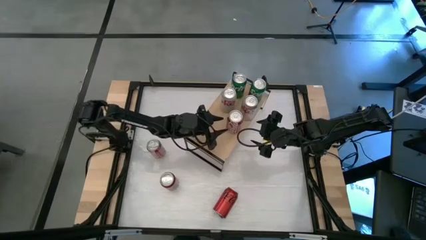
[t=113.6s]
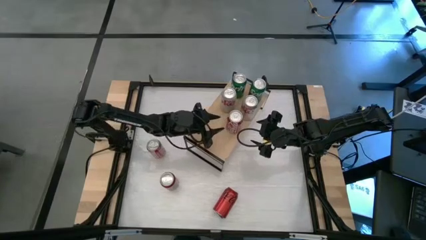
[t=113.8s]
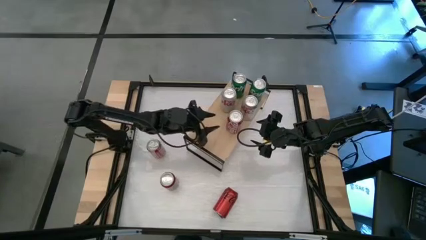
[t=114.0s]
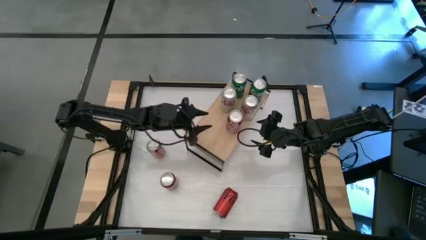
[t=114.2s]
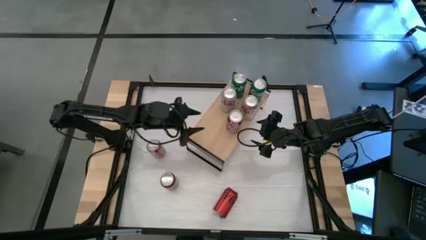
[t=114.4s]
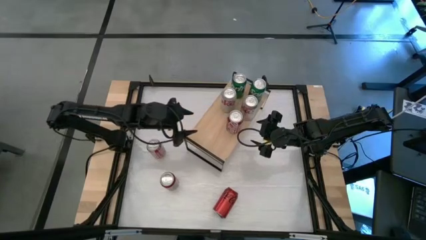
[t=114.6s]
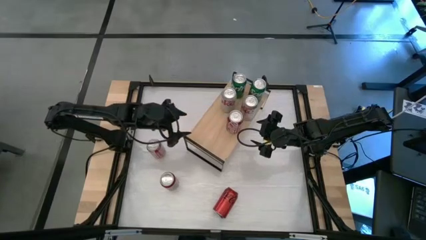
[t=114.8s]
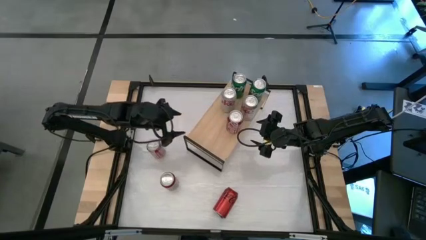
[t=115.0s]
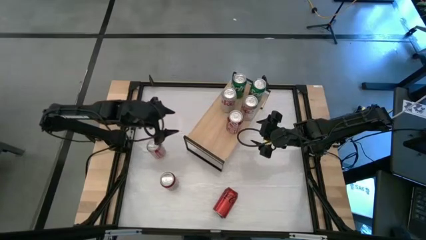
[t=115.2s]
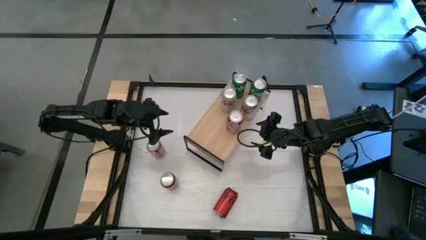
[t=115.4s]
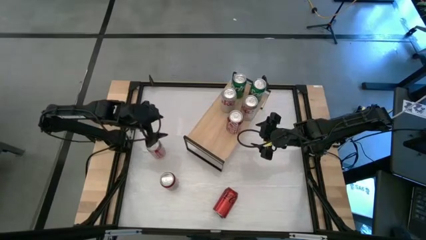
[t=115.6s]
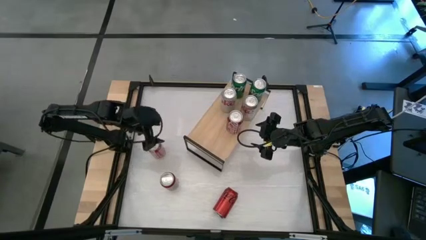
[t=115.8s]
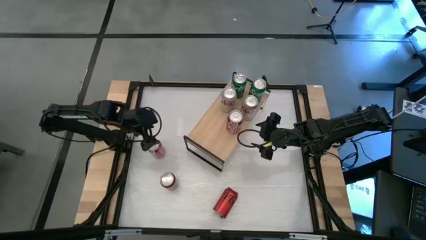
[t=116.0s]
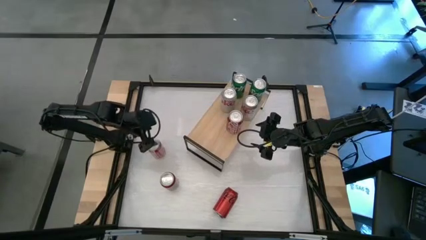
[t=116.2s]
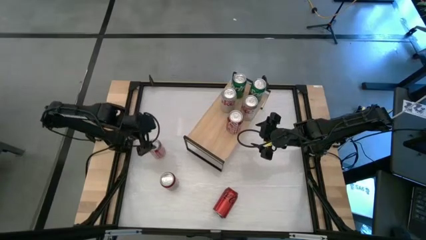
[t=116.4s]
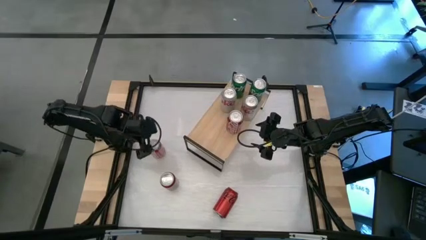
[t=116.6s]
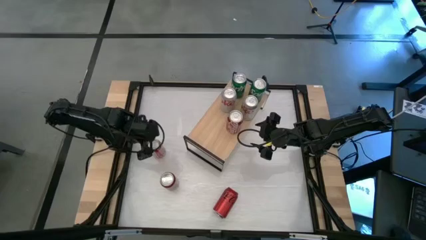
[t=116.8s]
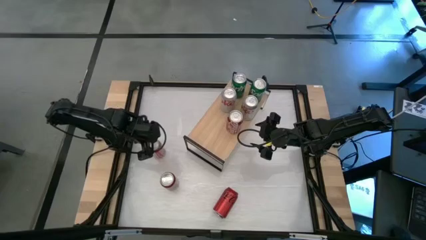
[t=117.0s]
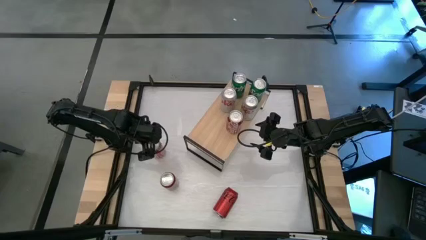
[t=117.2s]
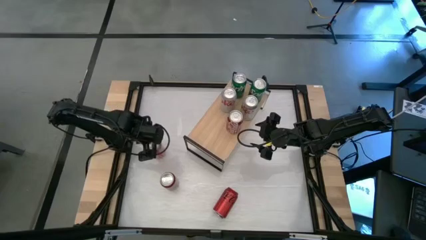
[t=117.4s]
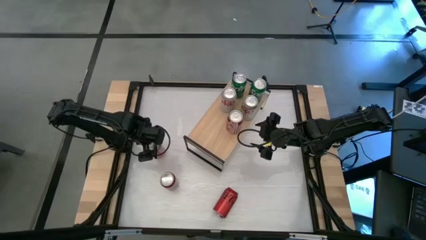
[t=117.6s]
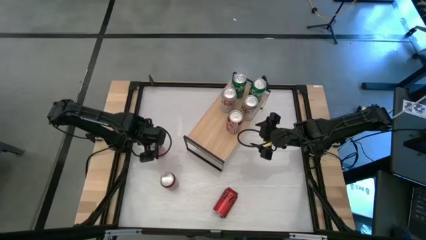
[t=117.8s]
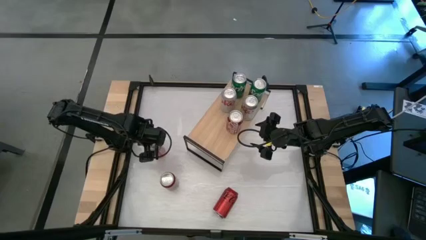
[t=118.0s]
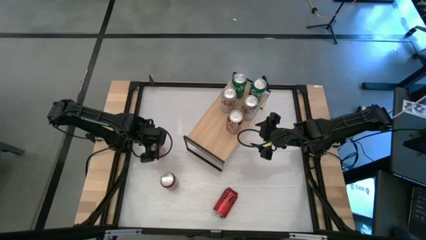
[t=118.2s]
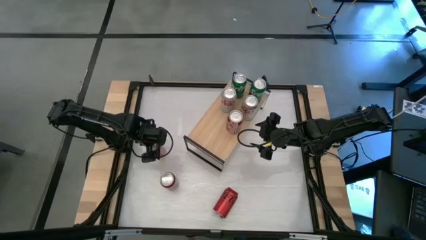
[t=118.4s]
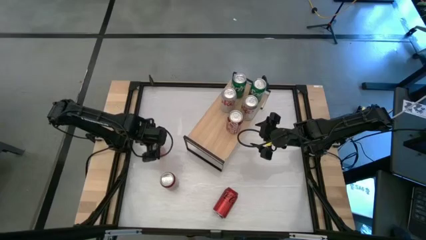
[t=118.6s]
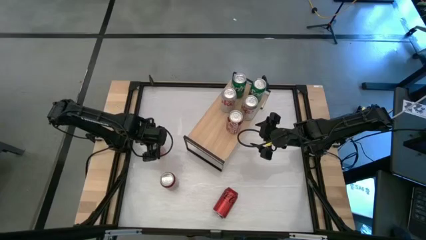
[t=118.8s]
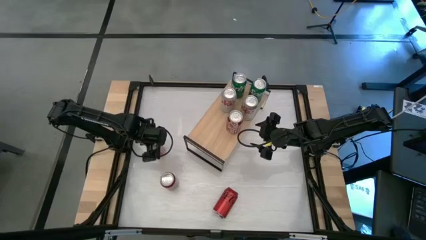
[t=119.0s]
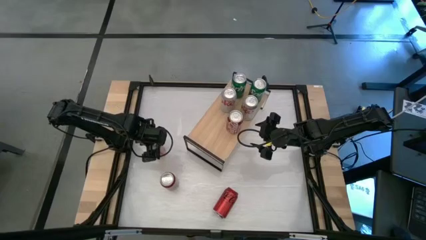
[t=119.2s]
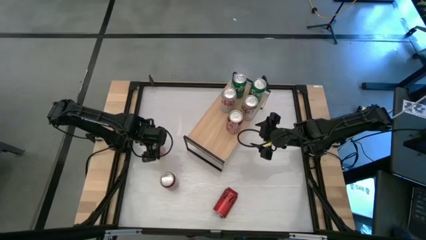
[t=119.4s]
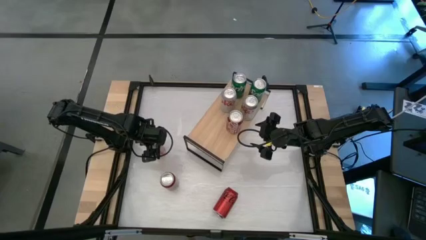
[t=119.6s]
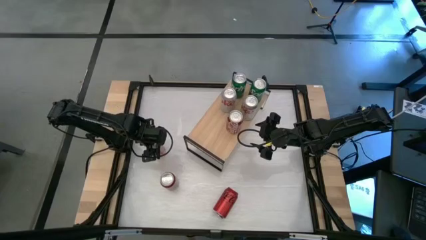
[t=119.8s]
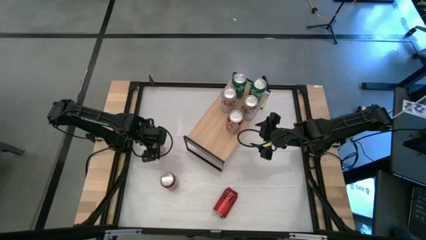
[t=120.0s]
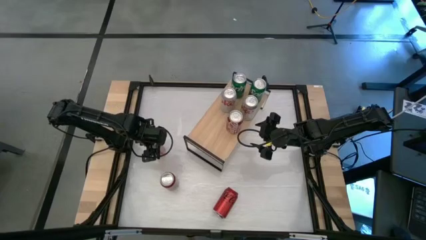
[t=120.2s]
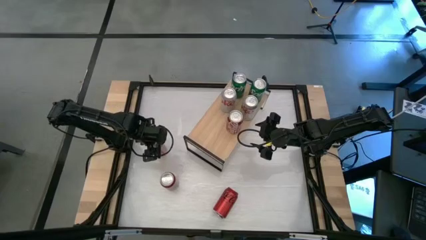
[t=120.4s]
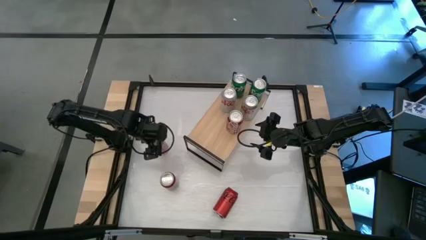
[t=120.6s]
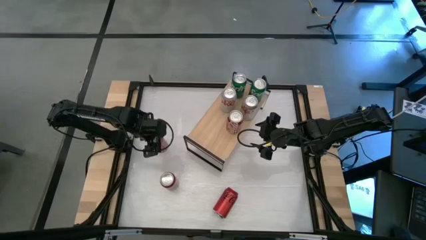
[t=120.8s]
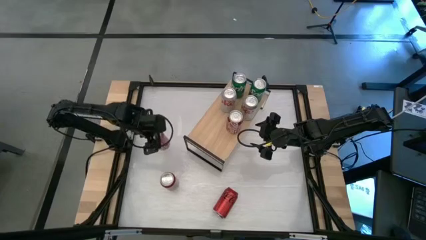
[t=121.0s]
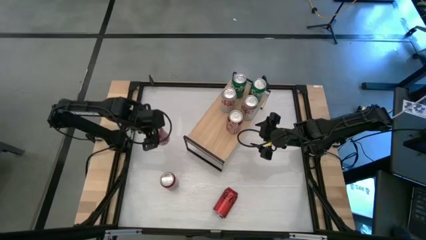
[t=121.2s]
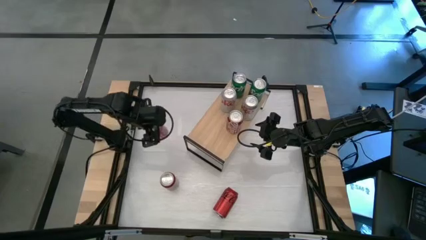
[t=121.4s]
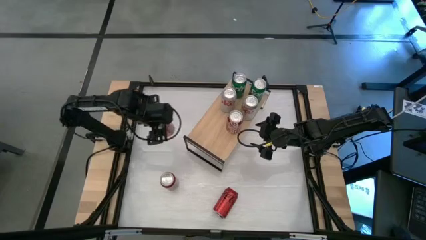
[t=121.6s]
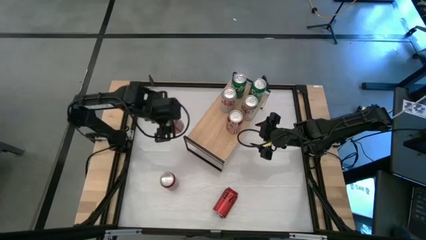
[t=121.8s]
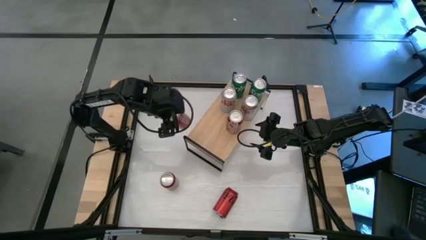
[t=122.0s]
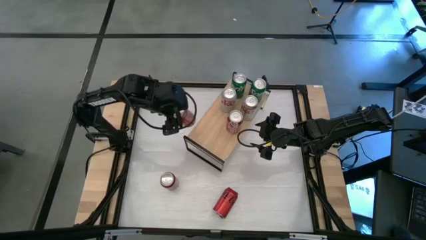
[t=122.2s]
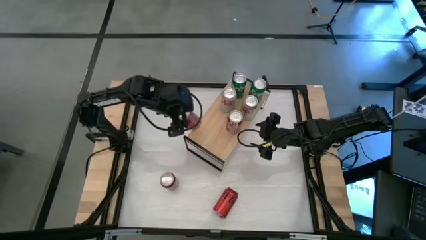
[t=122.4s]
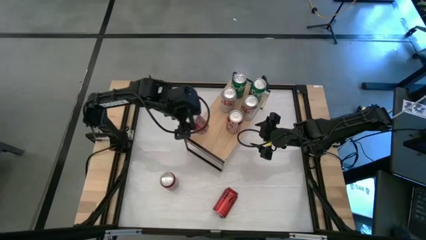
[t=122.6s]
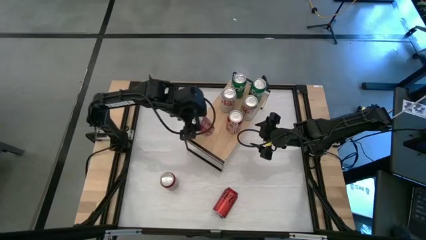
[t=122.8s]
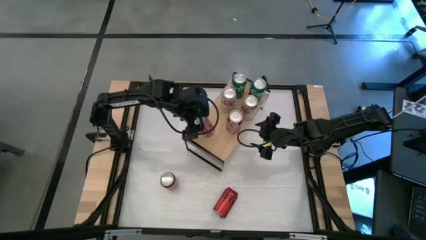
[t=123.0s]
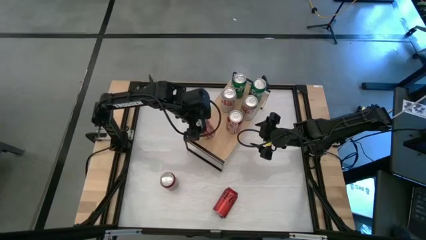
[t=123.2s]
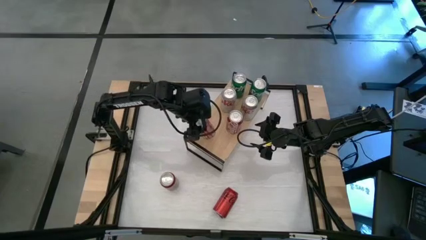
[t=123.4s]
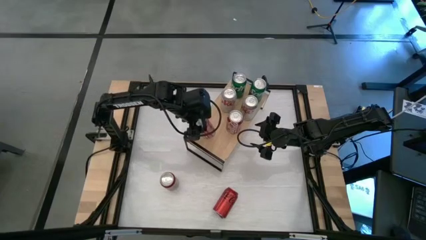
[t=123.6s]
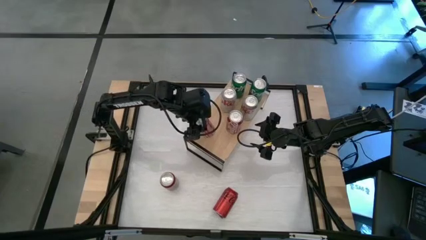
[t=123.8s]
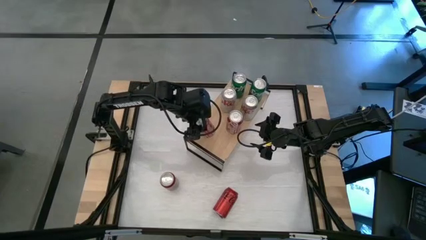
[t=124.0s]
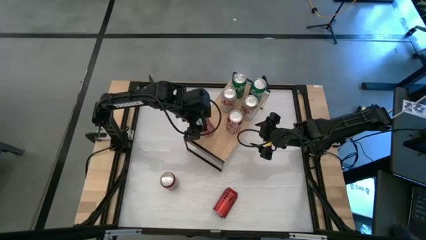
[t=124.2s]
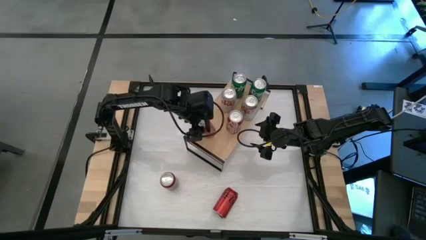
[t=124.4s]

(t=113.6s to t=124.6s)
Task: Place canned beverage on shelf
Put the red-white soda can on the shelf aligned with the other red-white soda can
